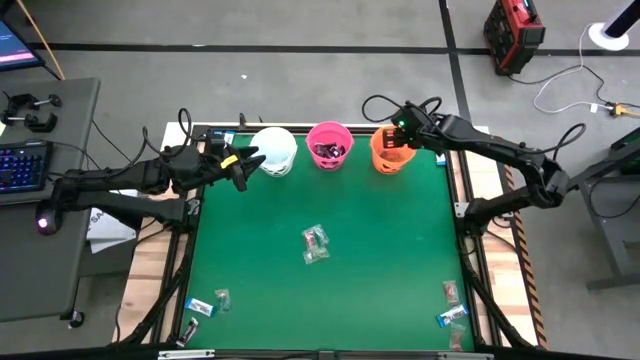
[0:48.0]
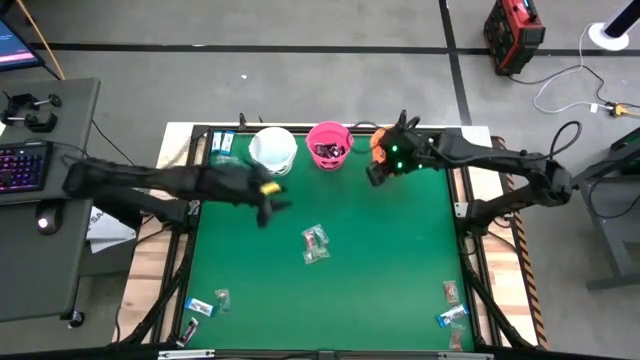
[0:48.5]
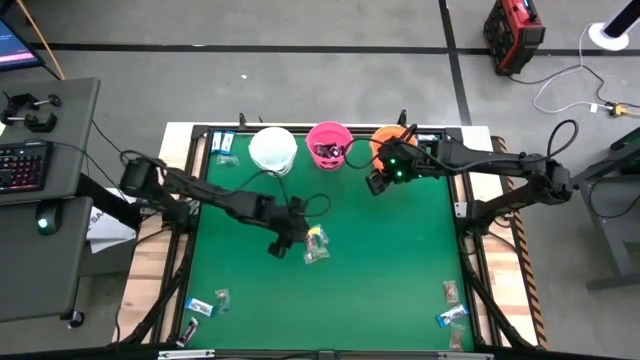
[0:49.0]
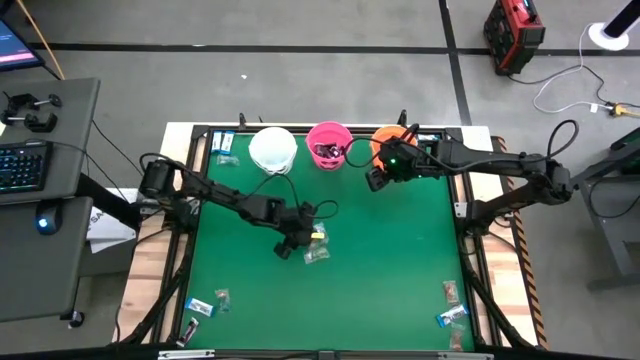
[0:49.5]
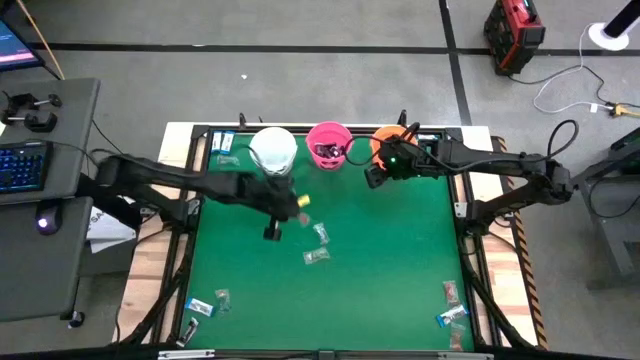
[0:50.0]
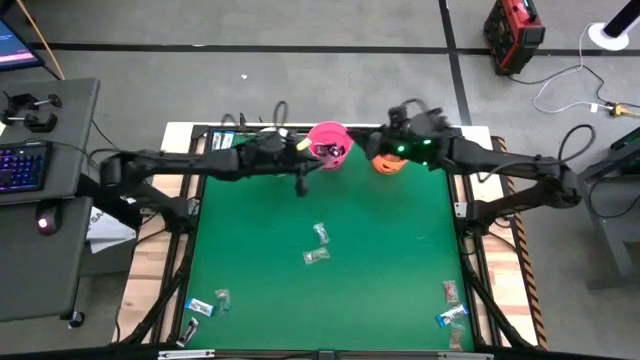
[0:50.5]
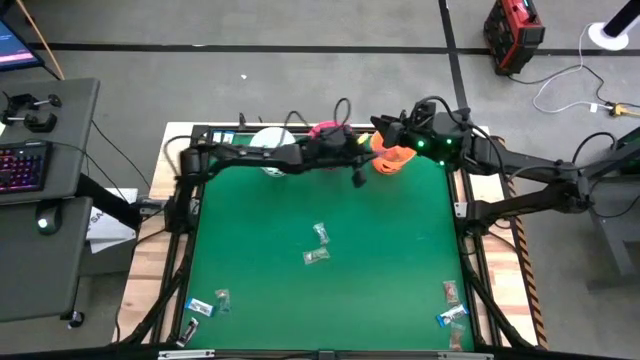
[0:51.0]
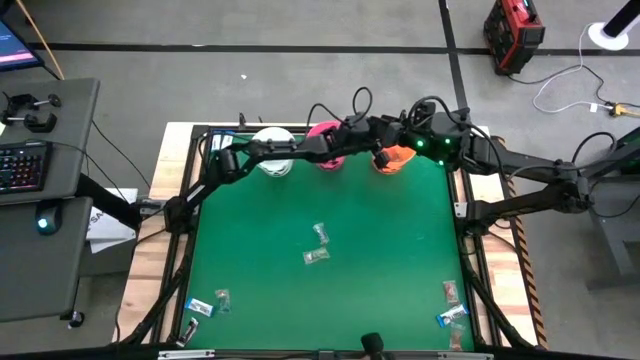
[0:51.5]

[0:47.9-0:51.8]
Task: Sort candy by brand, put in halloween buckets
Put the orange gummy into the orange bucket

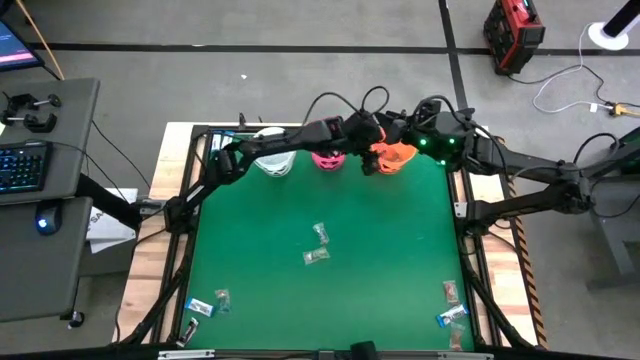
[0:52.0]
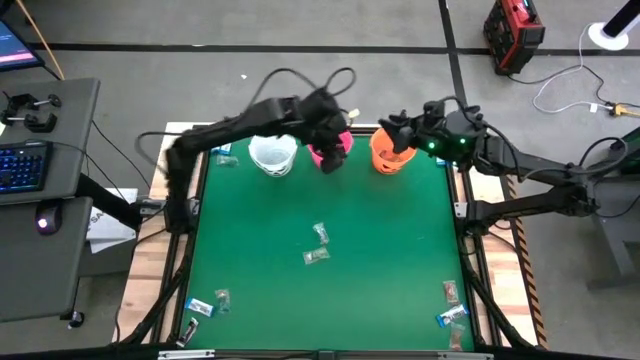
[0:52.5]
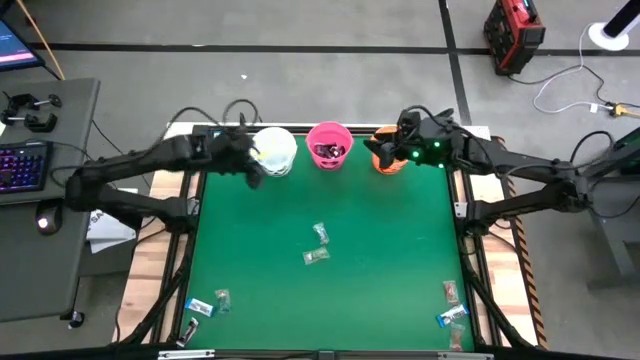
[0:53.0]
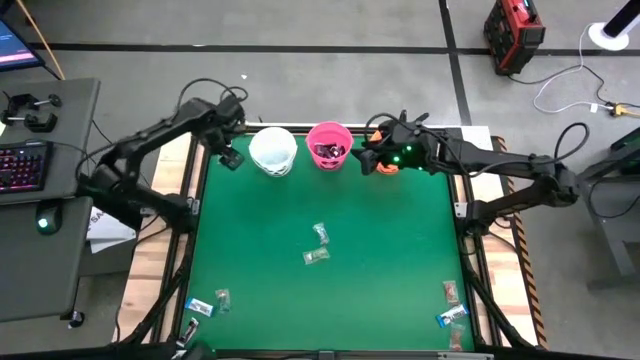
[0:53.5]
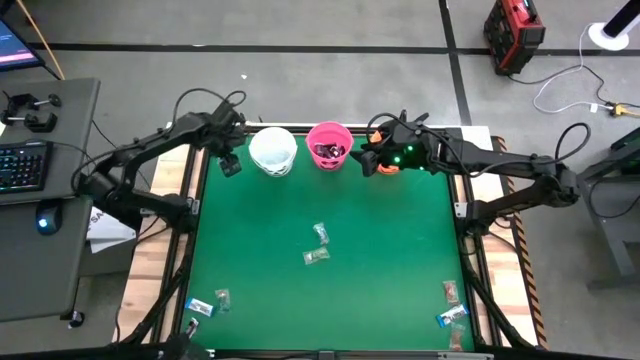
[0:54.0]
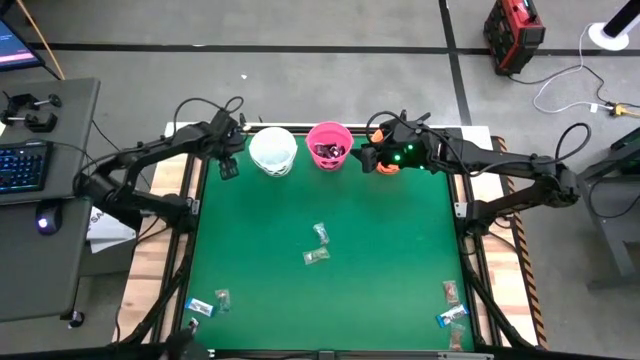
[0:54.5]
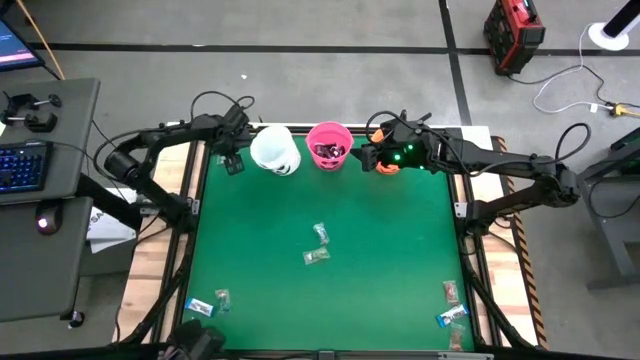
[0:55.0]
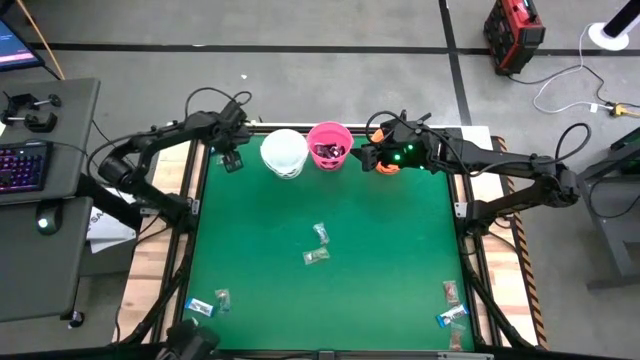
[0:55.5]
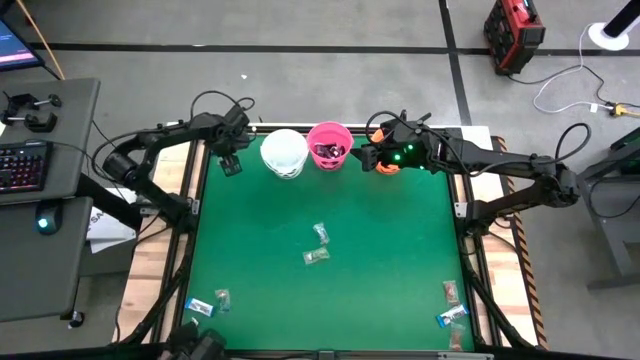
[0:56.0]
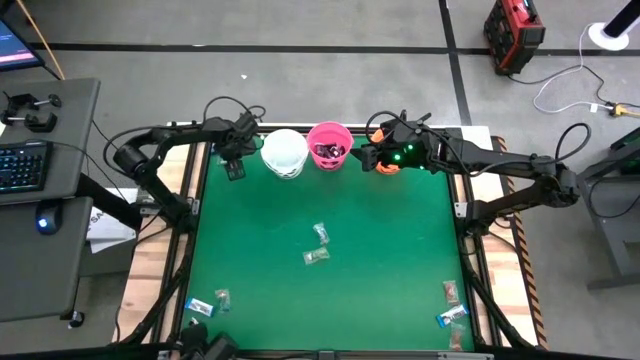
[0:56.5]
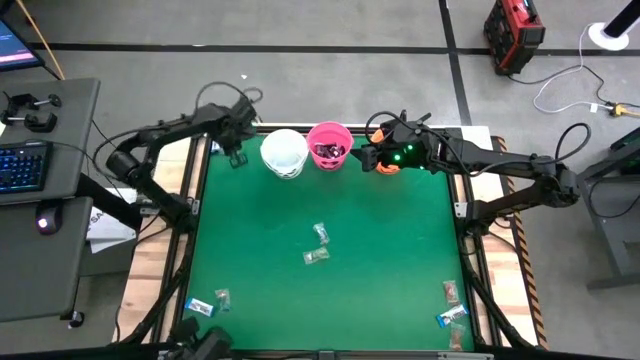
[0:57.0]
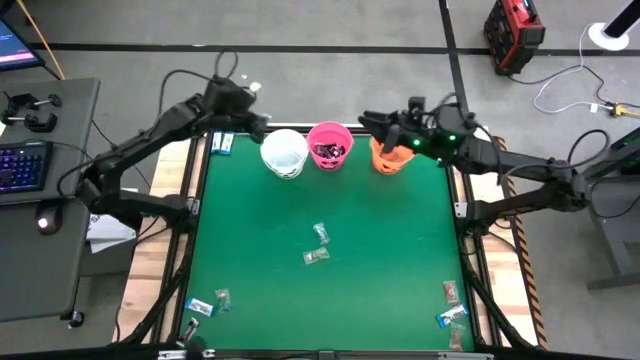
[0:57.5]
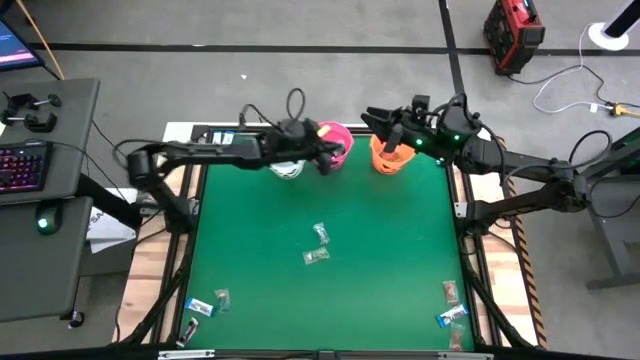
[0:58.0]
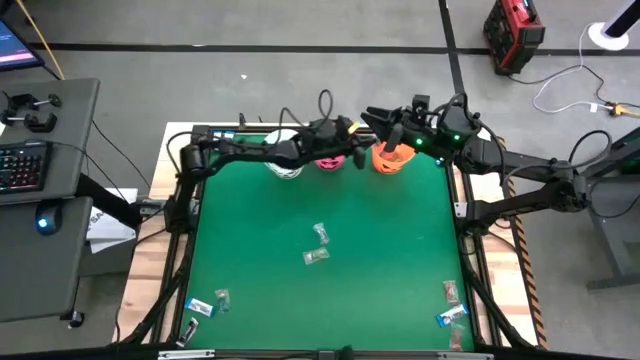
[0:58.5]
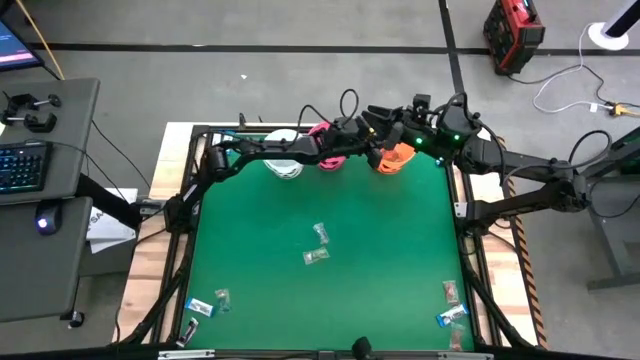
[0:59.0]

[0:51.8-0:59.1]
Put the blue gummy into the orange bucket

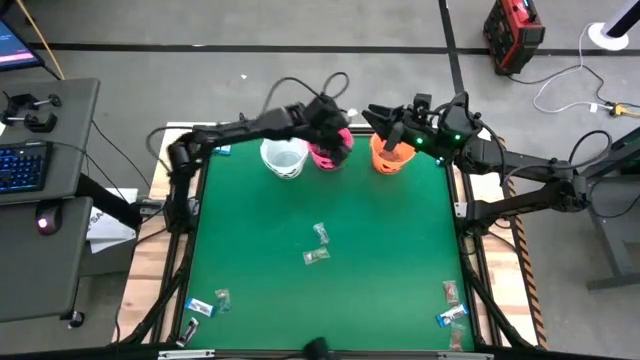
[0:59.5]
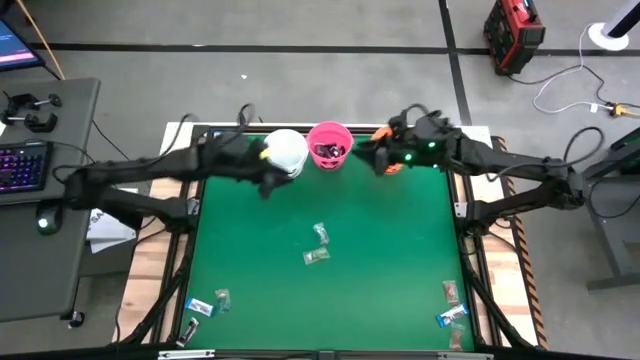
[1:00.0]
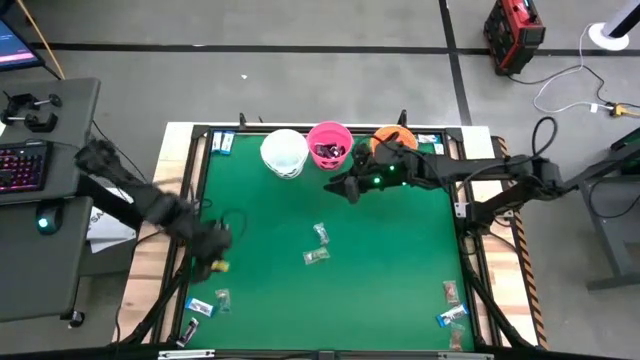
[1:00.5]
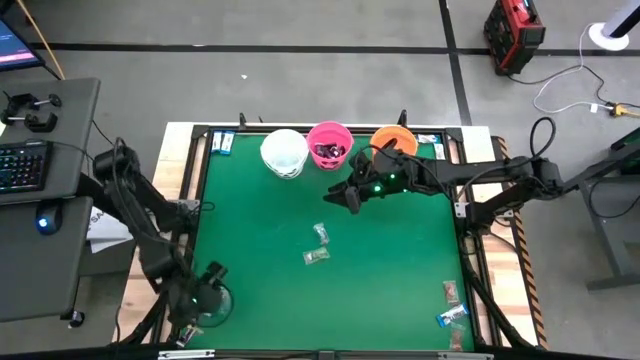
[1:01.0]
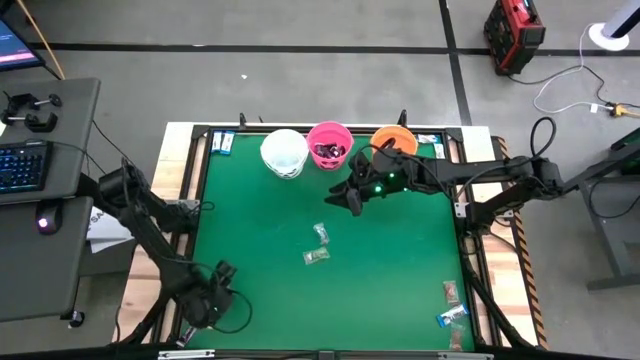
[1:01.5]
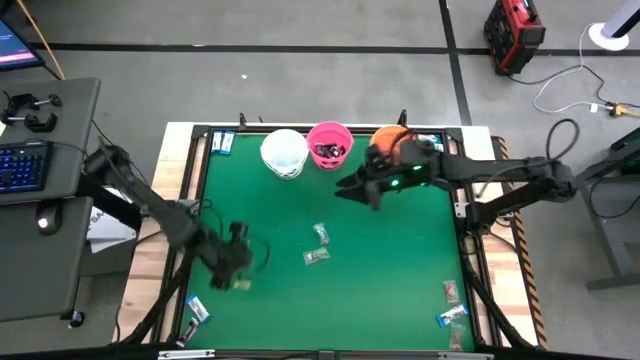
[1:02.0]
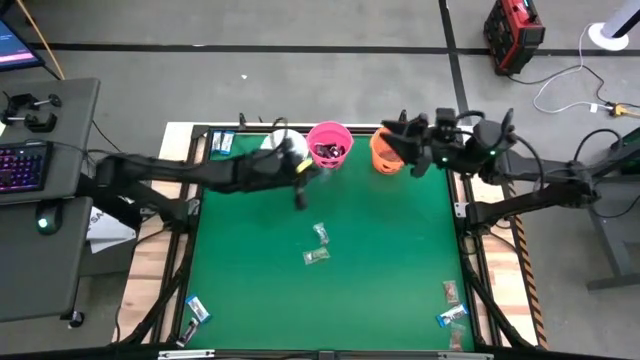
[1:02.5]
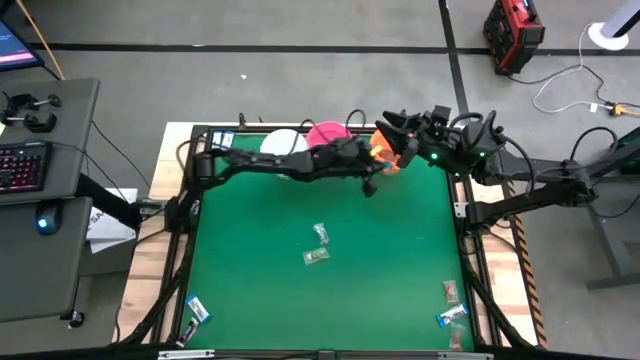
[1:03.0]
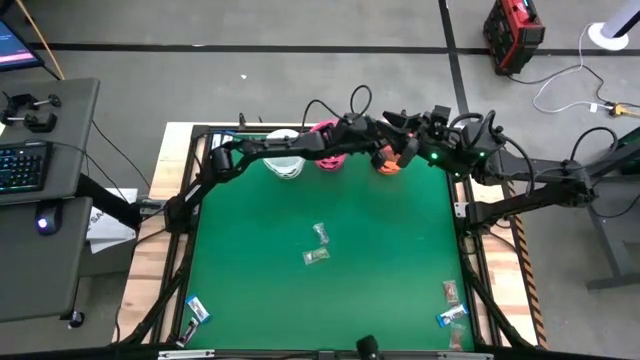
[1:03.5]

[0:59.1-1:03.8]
Put the blue gummy into the orange bucket

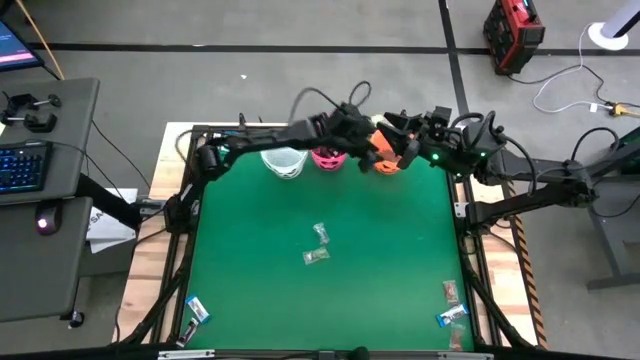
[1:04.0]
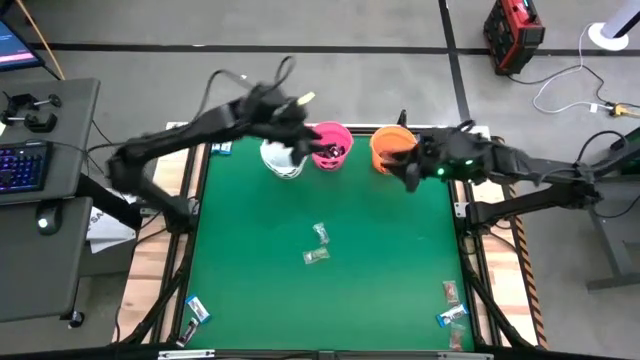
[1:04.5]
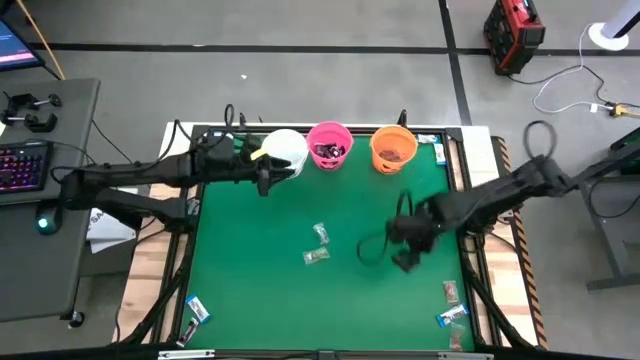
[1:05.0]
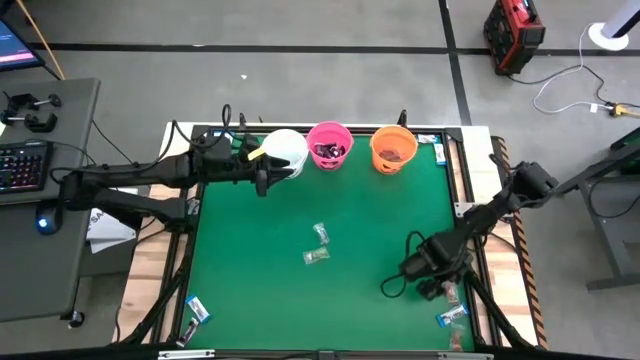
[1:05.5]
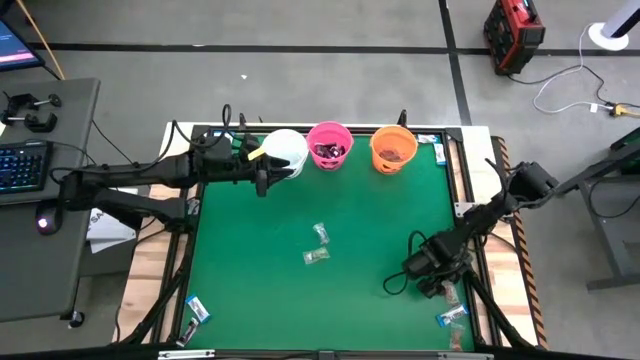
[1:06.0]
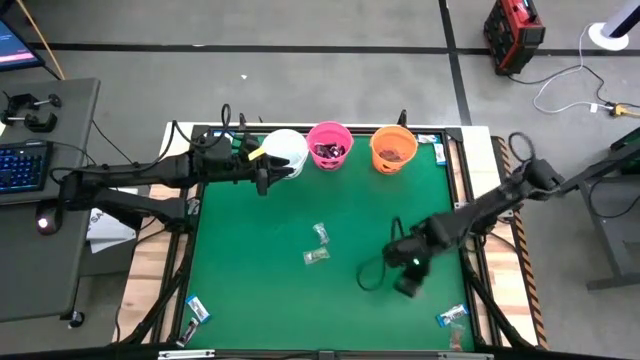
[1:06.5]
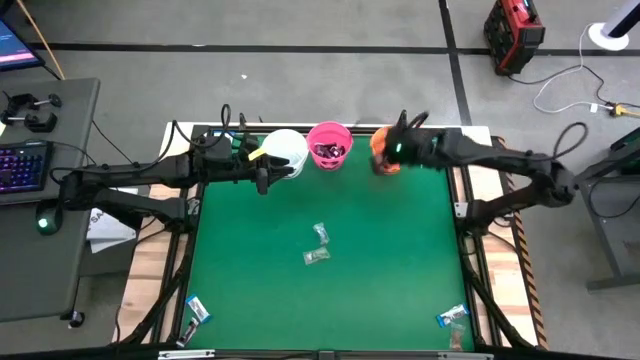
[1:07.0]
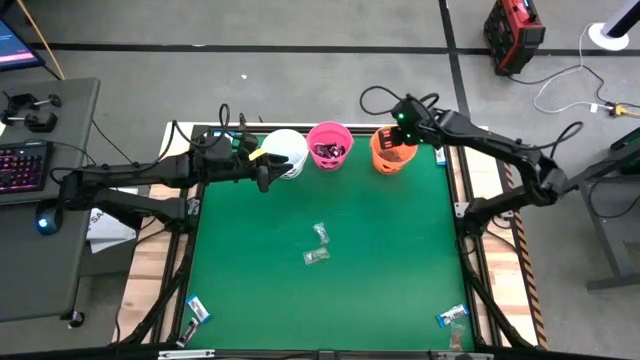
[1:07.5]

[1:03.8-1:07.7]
Put the orange gummy into the orange bucket

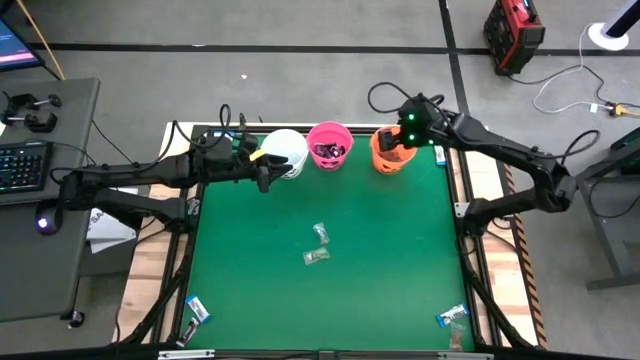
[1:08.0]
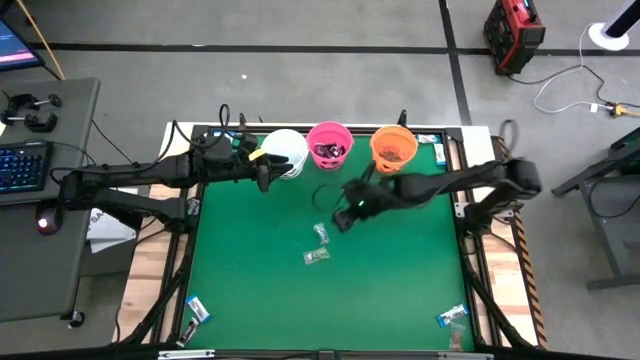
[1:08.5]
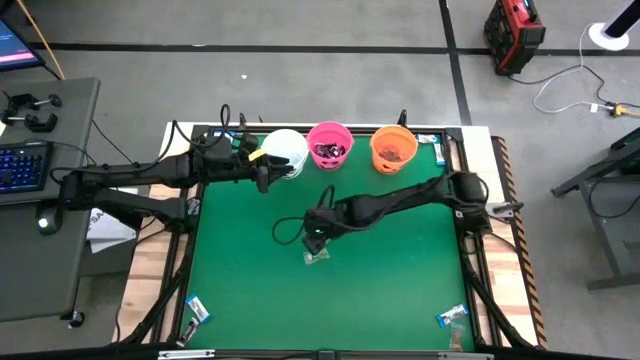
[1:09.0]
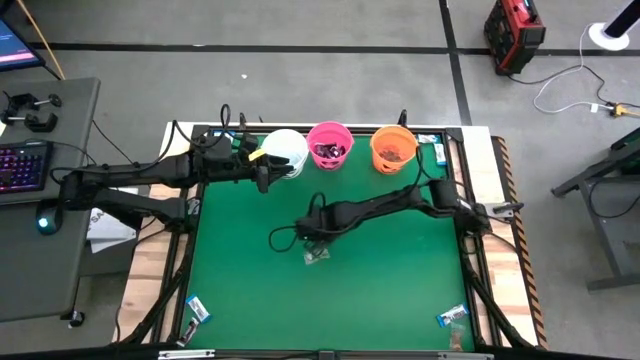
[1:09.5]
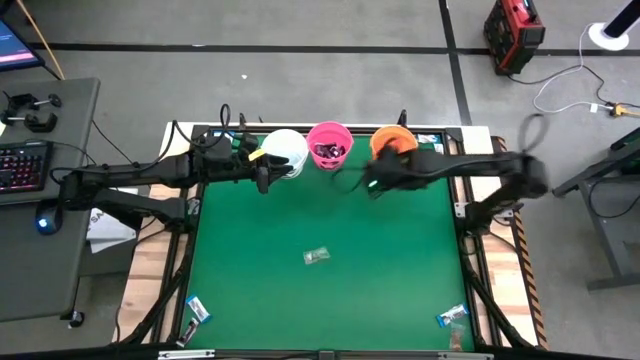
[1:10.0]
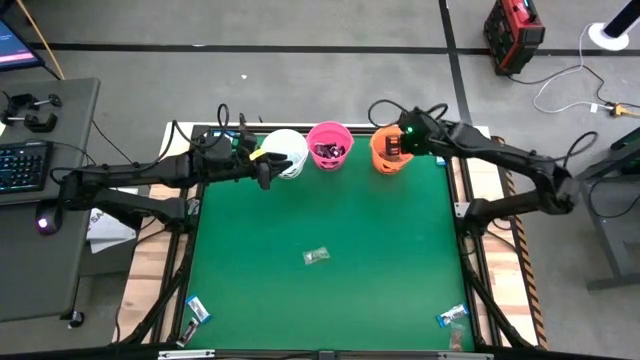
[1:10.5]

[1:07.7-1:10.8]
Put the blue gummy into the orange bucket
